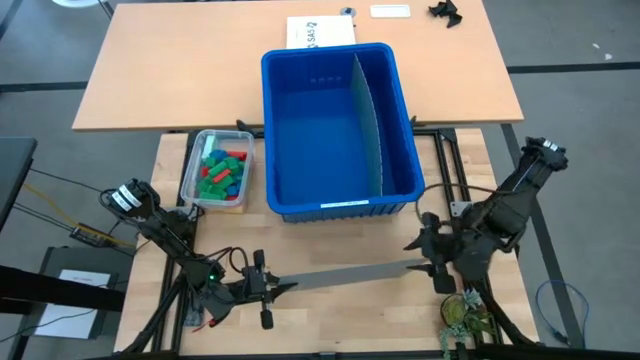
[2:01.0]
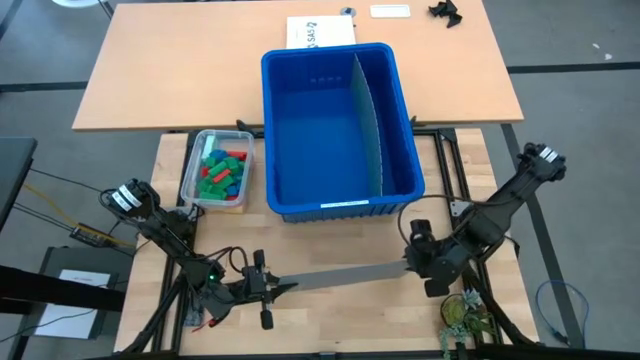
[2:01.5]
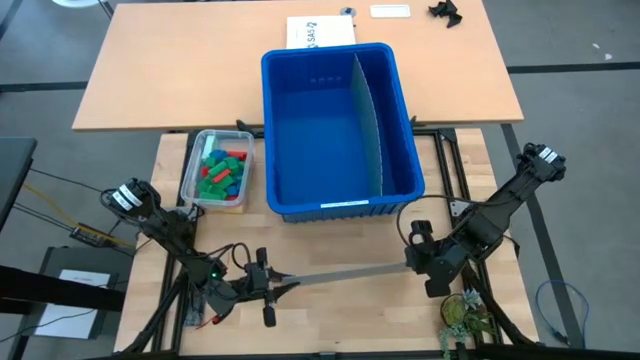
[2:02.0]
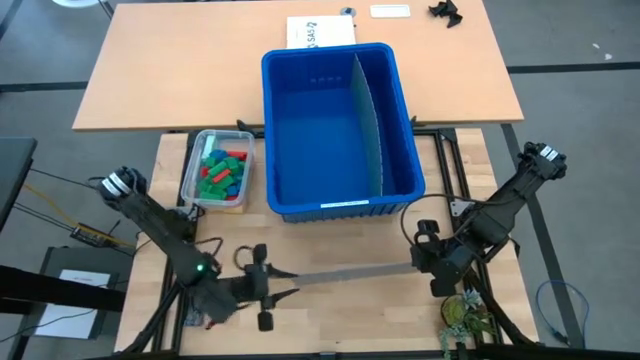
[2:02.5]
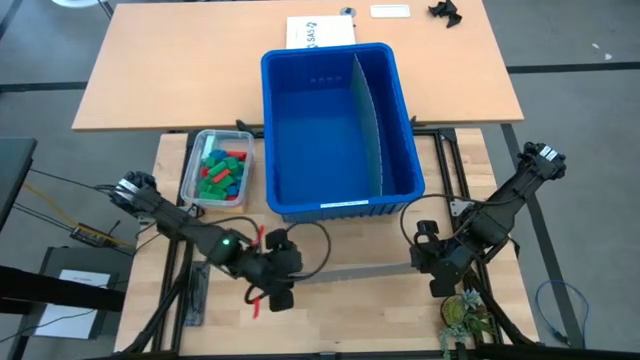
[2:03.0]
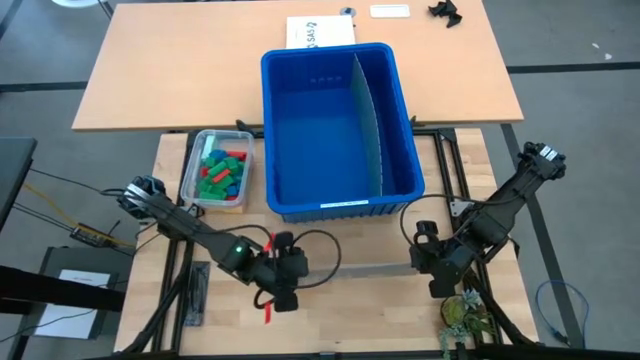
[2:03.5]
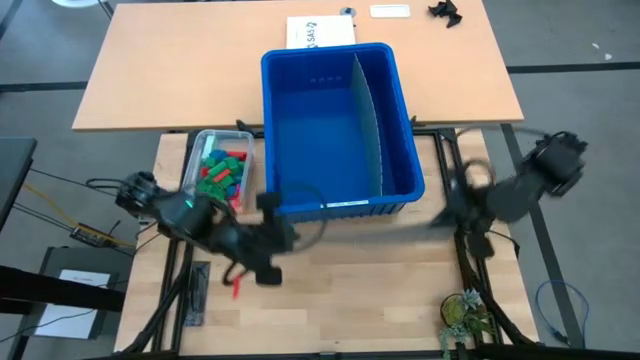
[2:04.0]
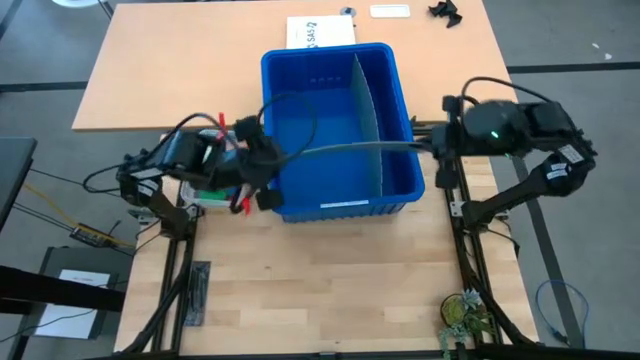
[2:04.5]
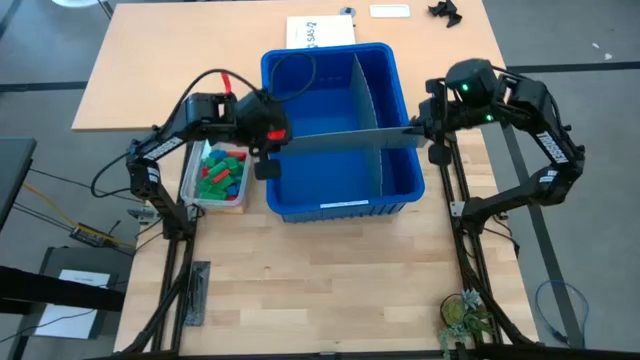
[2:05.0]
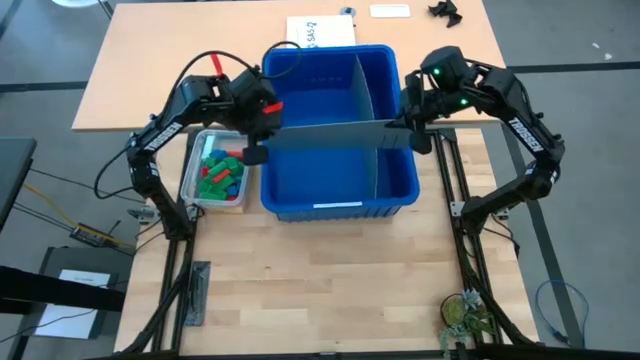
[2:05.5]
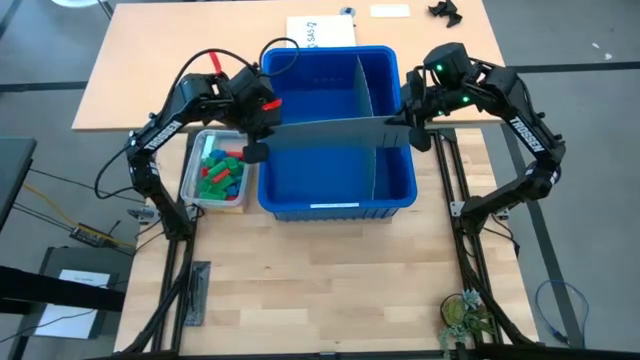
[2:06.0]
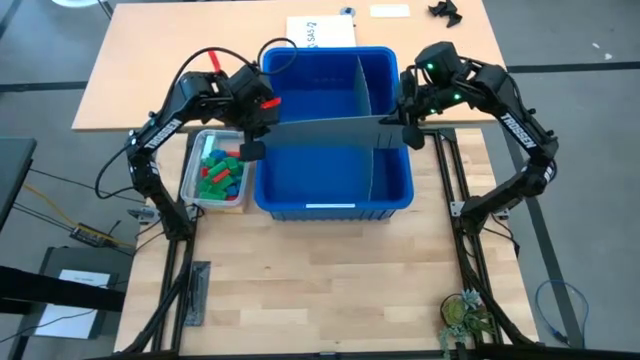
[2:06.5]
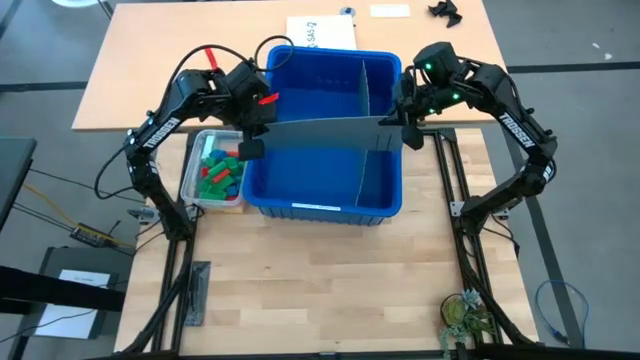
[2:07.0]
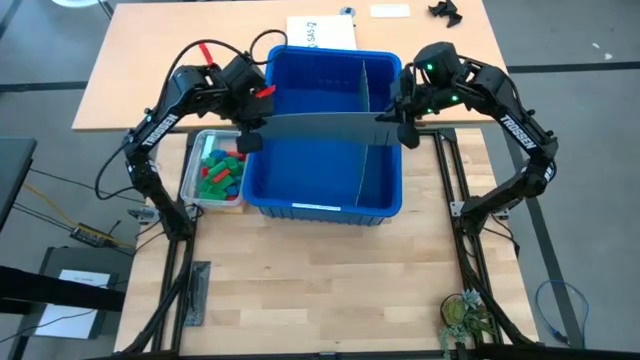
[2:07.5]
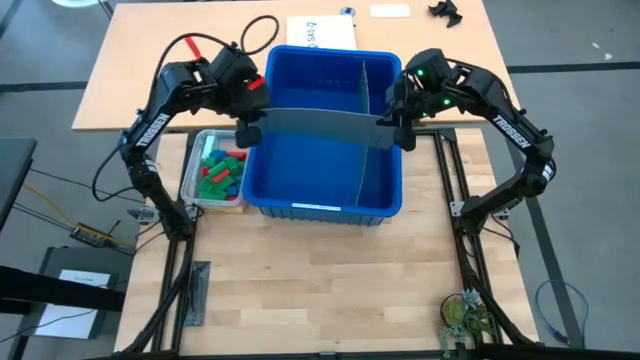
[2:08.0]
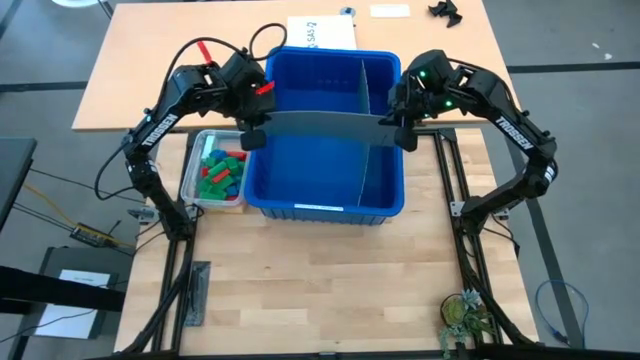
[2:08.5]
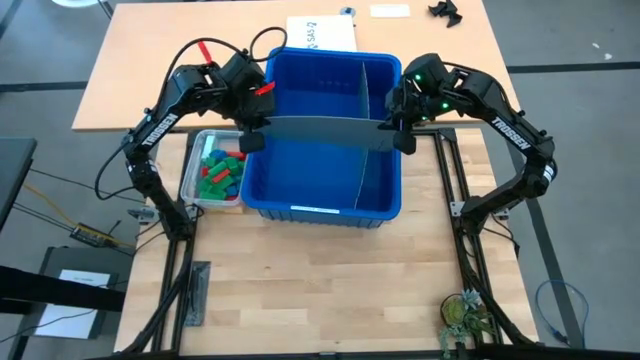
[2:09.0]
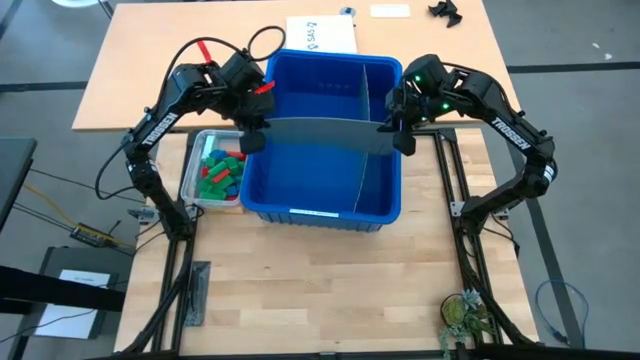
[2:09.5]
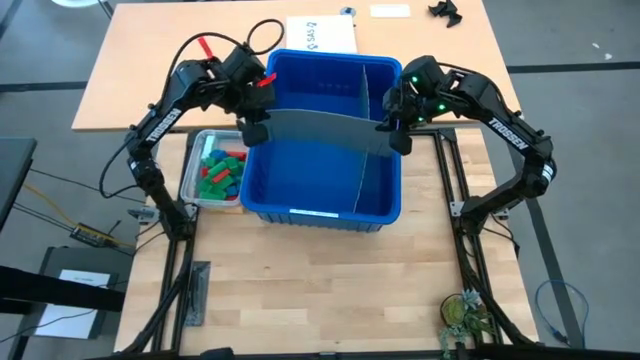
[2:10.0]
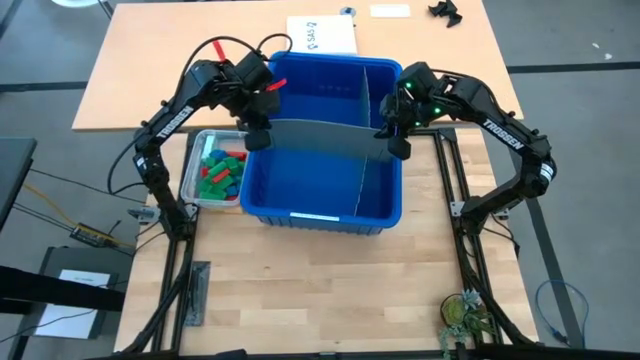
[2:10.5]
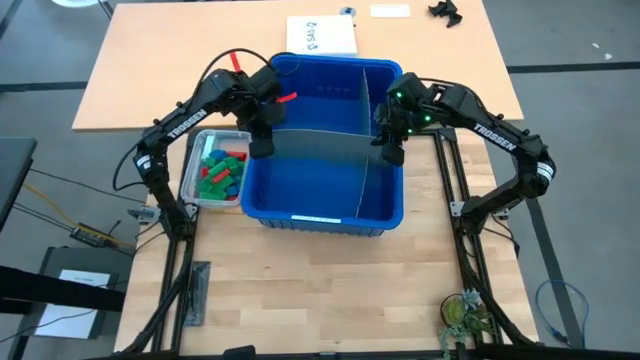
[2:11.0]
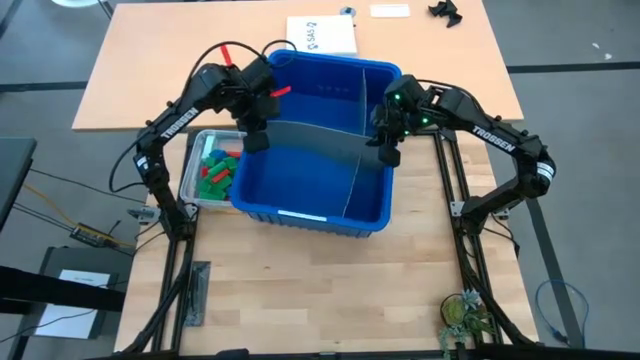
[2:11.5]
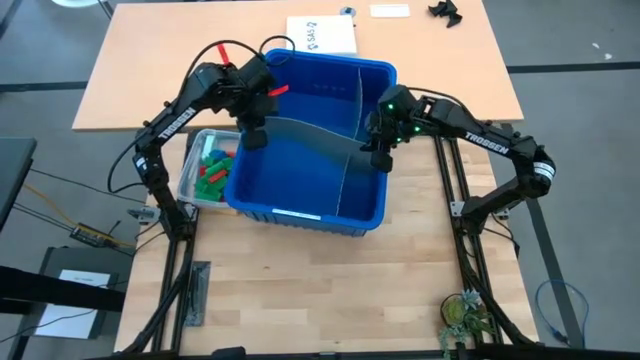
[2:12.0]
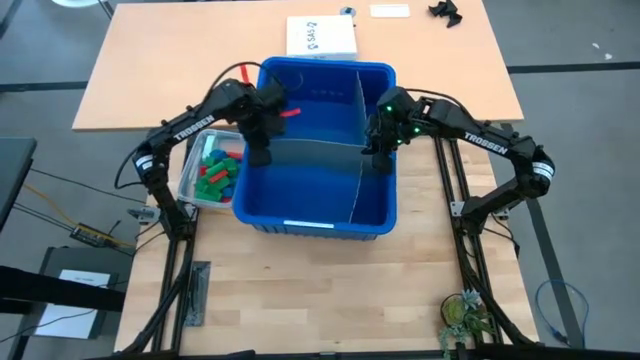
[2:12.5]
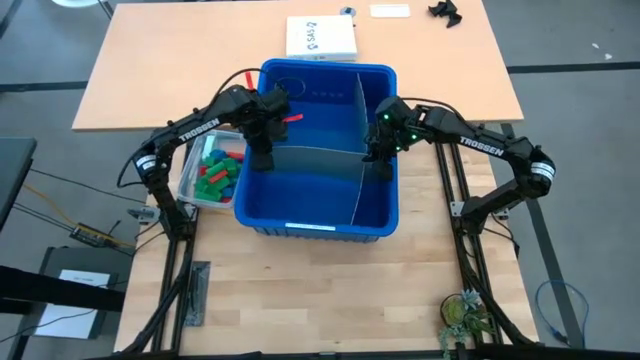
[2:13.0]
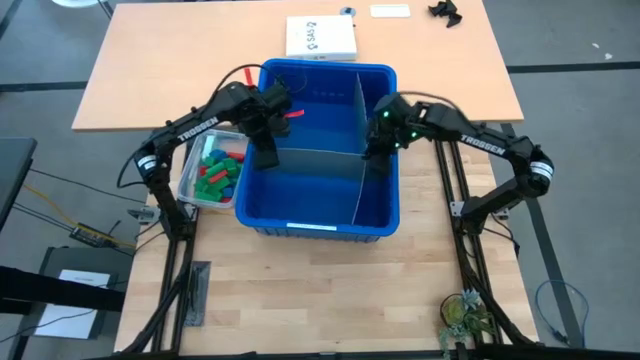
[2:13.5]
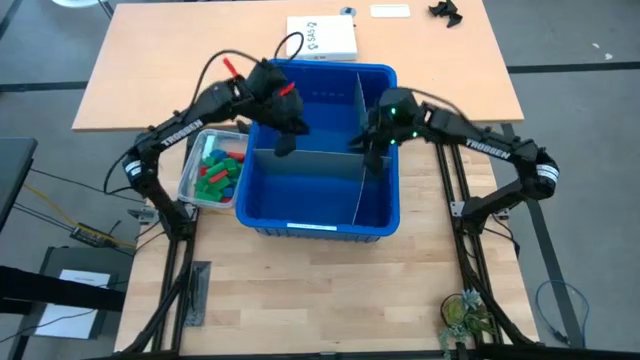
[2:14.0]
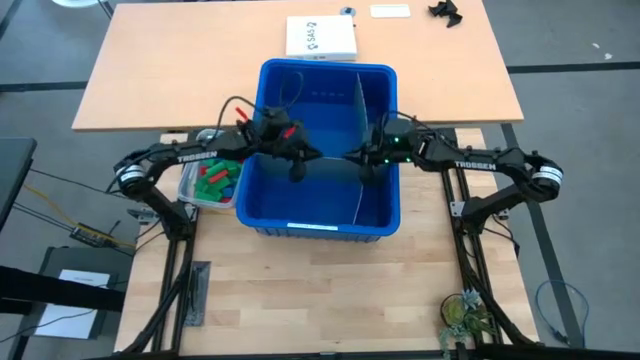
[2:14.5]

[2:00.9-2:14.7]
Task: Sort blocks
Assemble the blue bin using bin divider

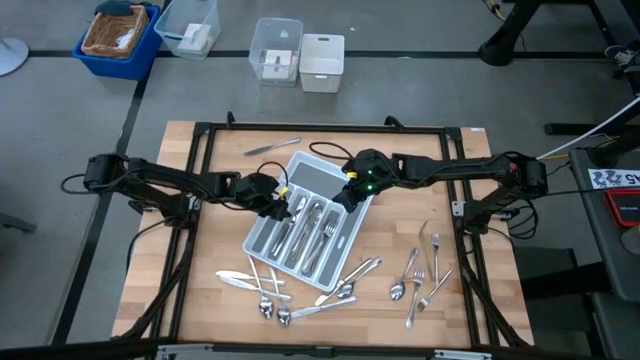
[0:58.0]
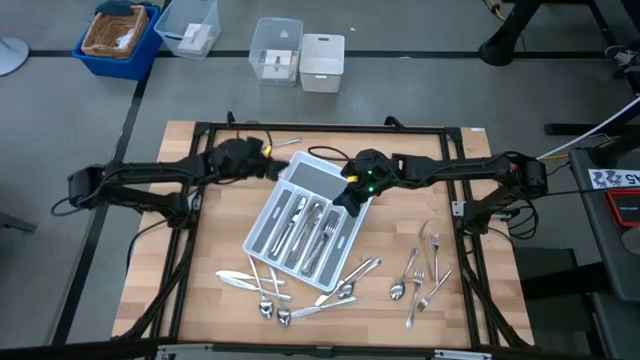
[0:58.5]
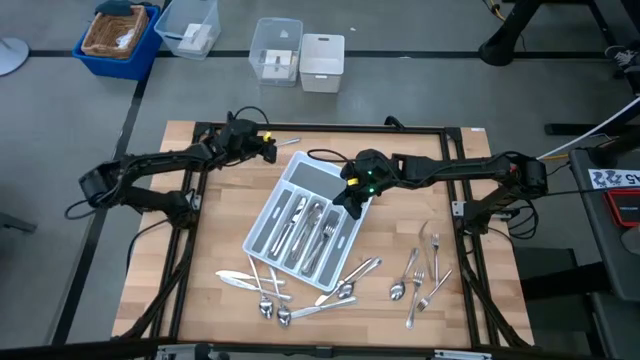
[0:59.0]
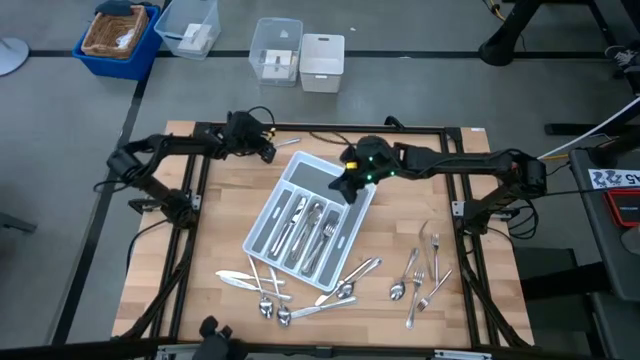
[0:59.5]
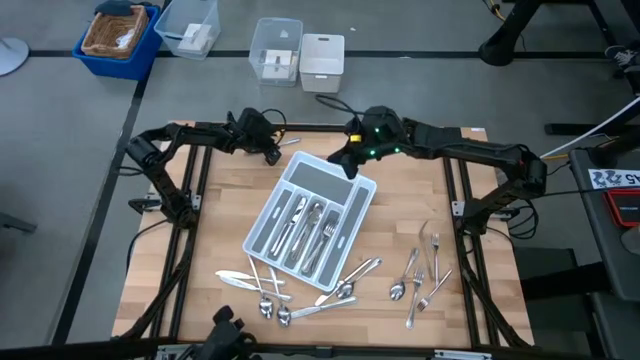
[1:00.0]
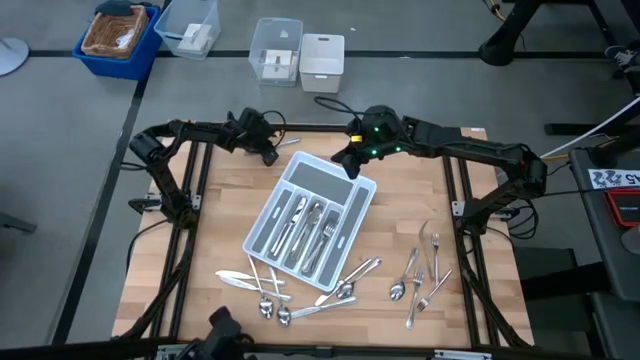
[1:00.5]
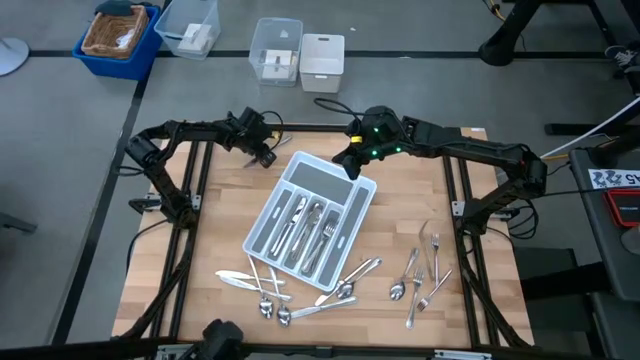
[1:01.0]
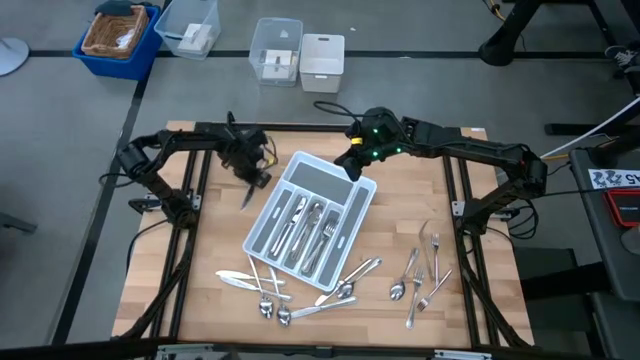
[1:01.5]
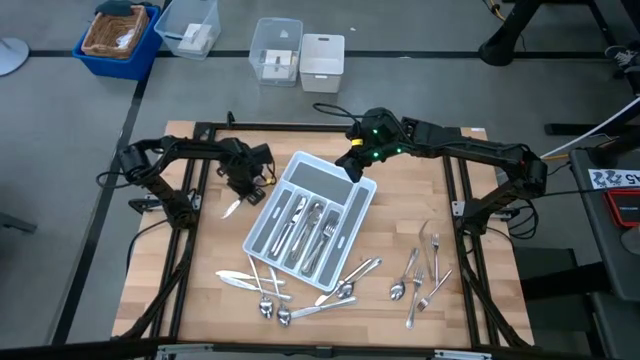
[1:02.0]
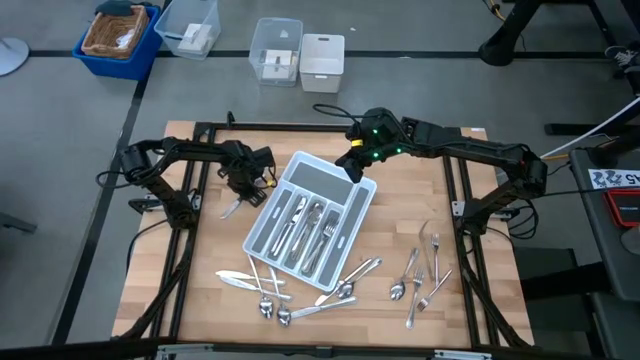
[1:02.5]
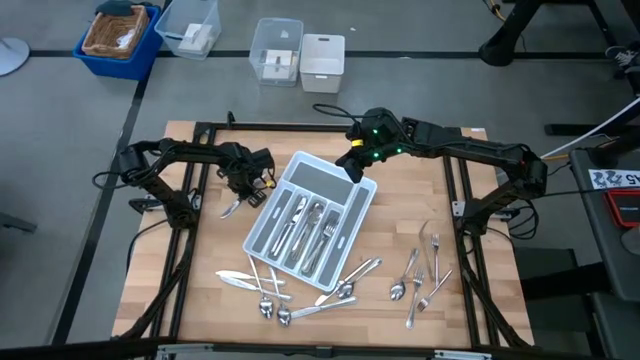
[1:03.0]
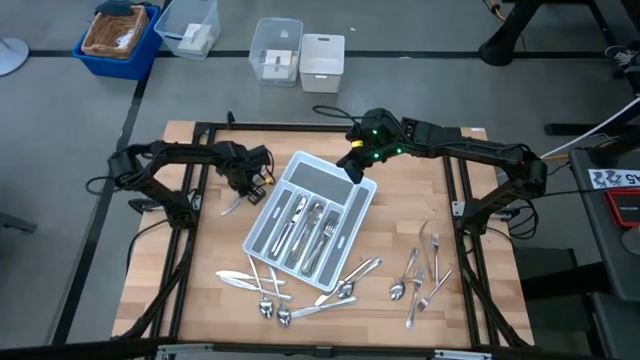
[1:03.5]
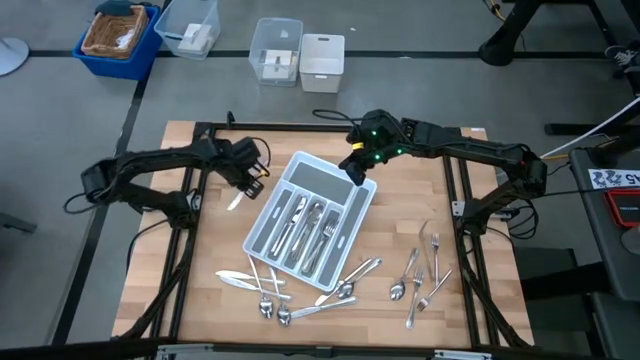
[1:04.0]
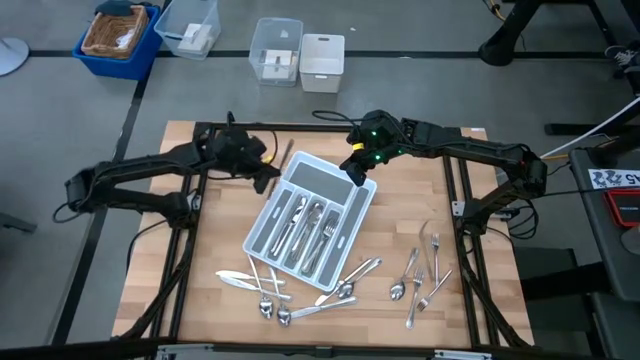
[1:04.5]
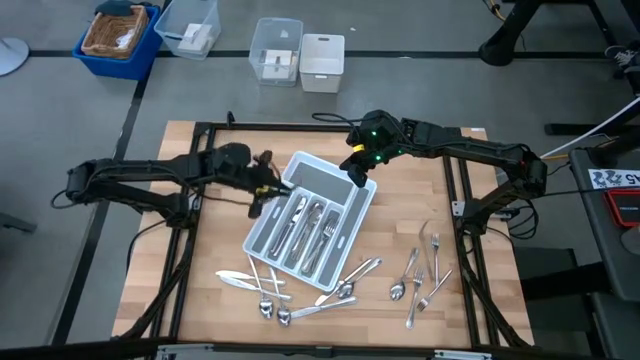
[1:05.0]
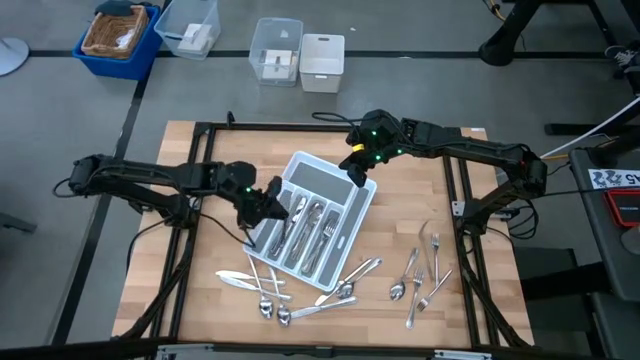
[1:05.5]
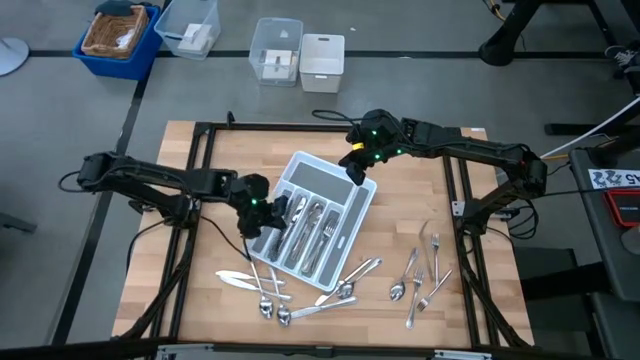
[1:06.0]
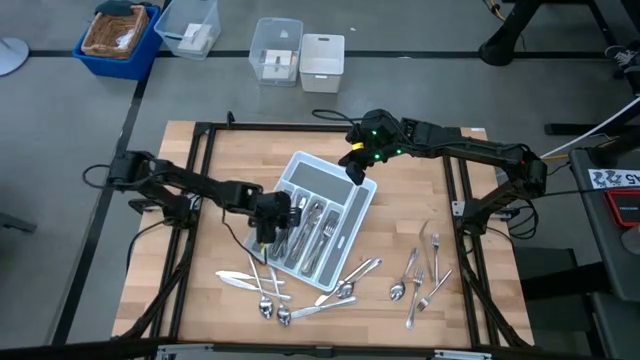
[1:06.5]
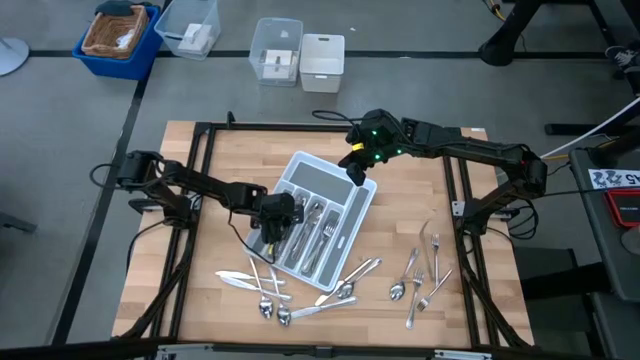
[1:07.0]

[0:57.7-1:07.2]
Task: Sort silverware
Put the silver knife into the white cutlery tray
